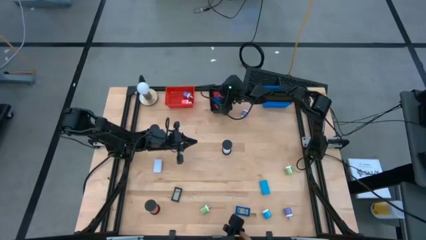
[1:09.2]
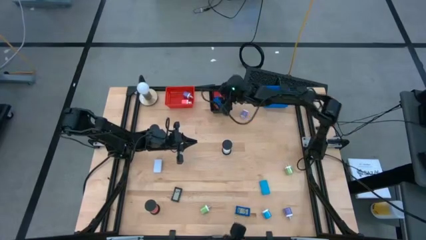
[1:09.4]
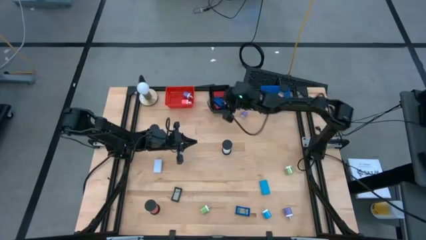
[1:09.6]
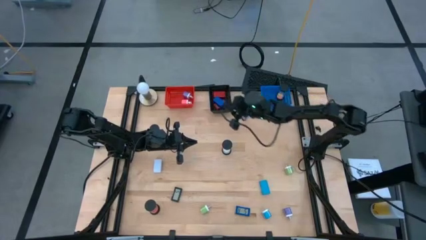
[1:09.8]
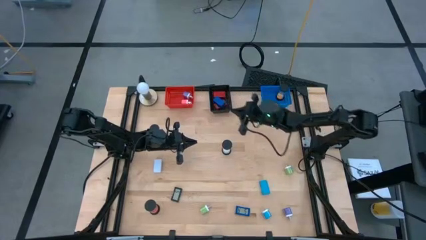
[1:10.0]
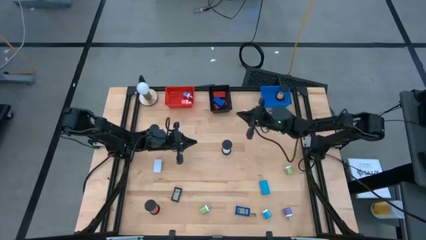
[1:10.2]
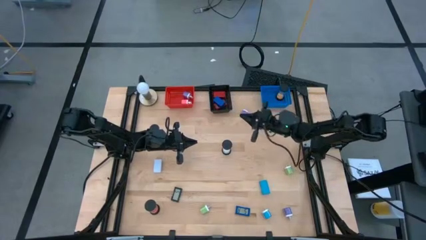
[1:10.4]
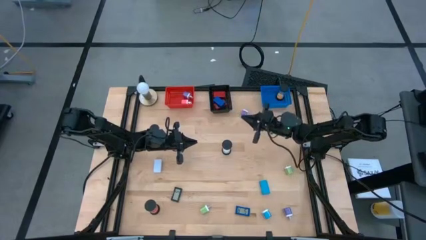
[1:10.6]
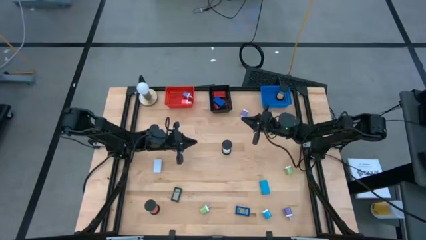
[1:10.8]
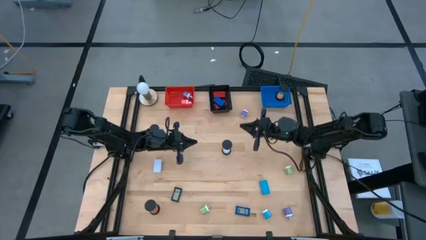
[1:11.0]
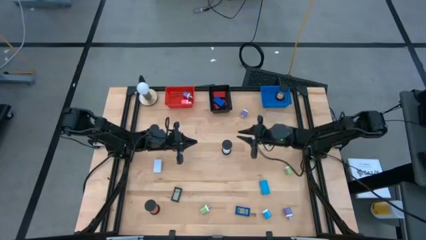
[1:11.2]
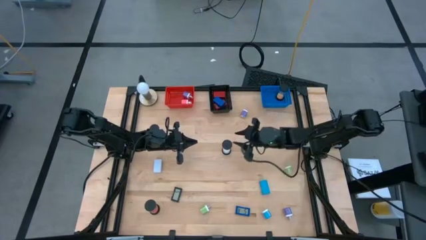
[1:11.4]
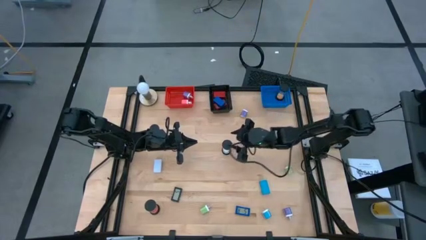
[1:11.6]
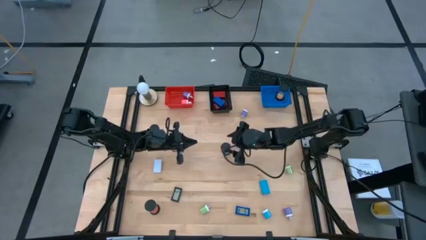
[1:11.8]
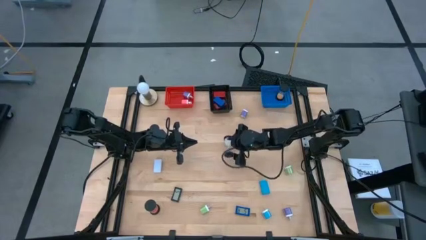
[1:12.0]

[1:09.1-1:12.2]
Task: Pick & Place Office items
Put the white hourglass into the blue bin

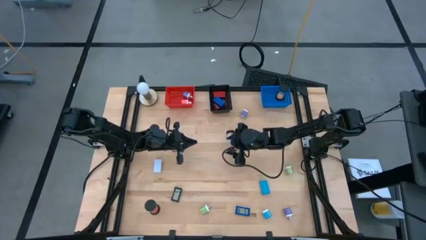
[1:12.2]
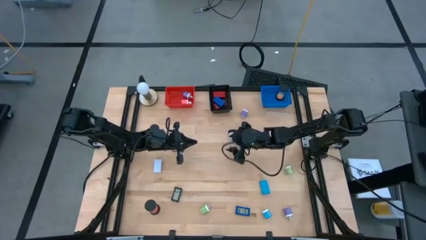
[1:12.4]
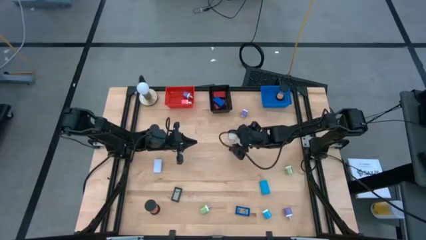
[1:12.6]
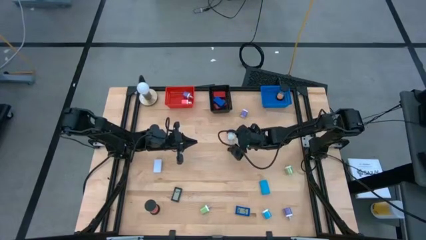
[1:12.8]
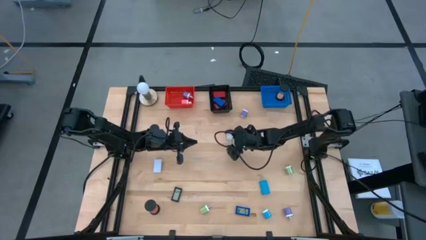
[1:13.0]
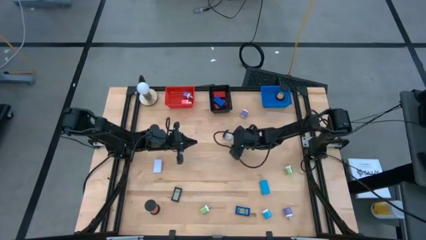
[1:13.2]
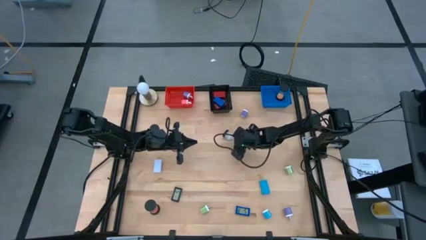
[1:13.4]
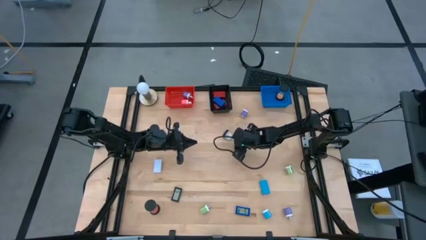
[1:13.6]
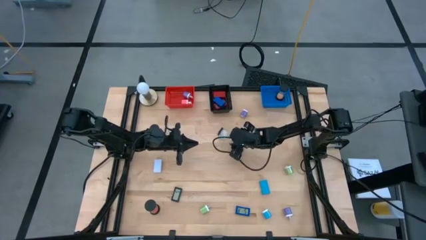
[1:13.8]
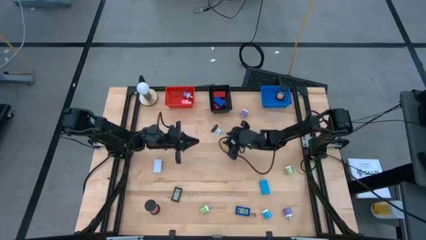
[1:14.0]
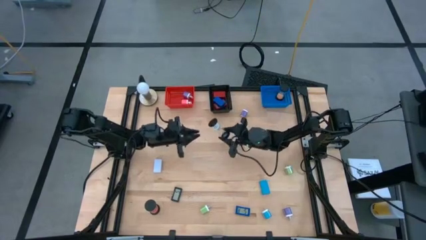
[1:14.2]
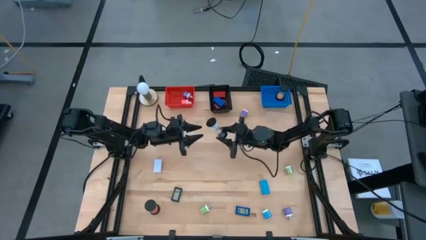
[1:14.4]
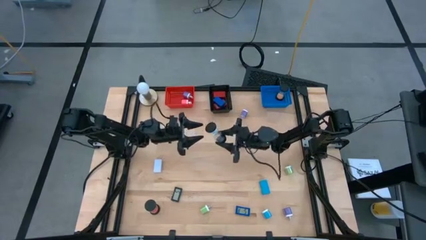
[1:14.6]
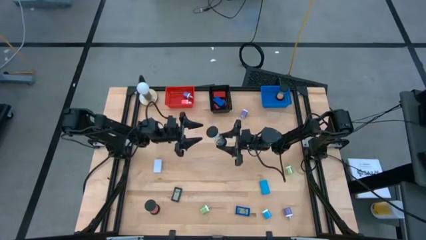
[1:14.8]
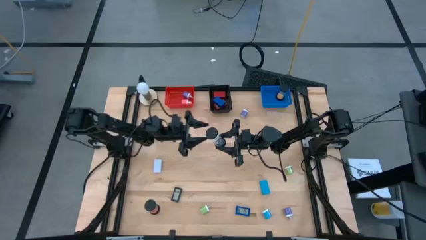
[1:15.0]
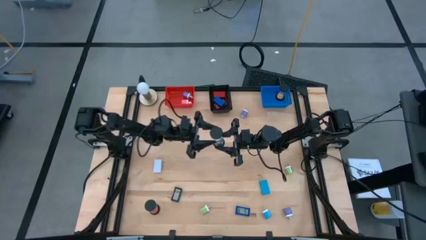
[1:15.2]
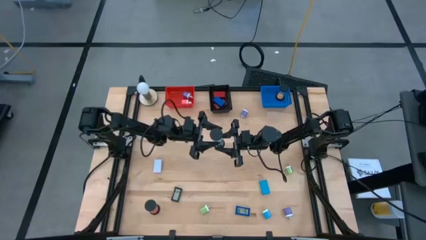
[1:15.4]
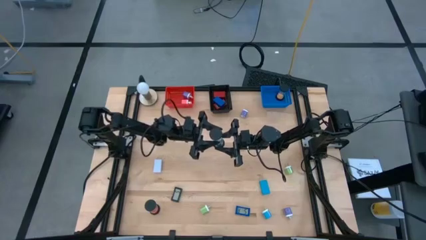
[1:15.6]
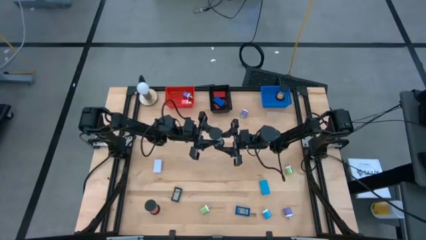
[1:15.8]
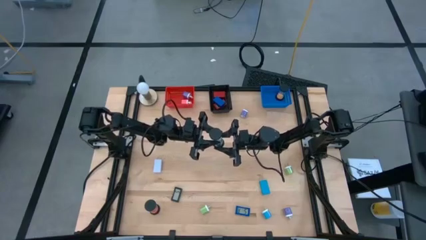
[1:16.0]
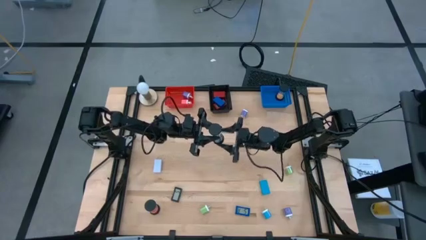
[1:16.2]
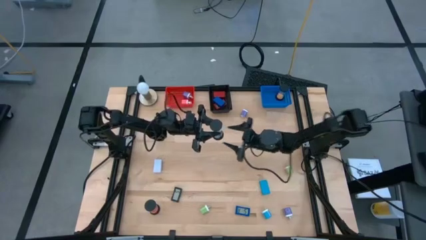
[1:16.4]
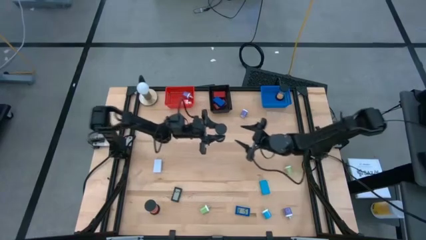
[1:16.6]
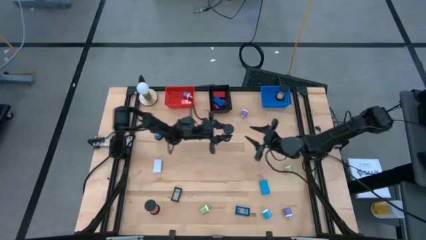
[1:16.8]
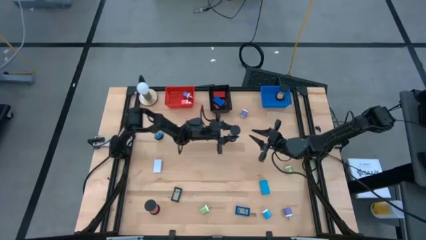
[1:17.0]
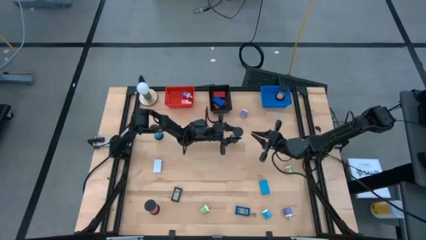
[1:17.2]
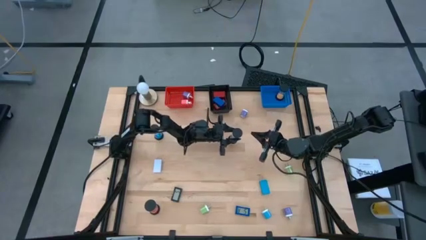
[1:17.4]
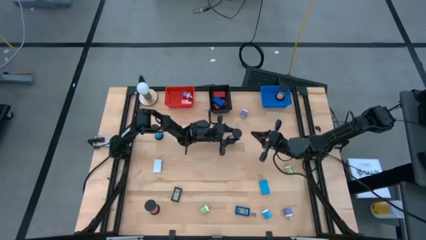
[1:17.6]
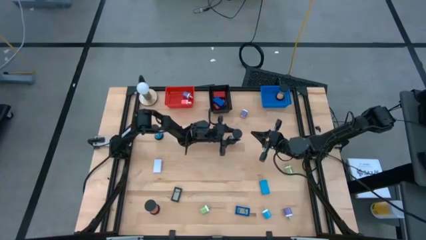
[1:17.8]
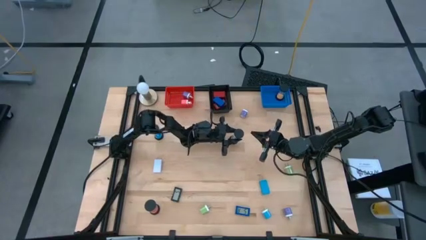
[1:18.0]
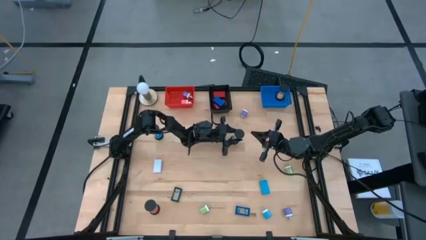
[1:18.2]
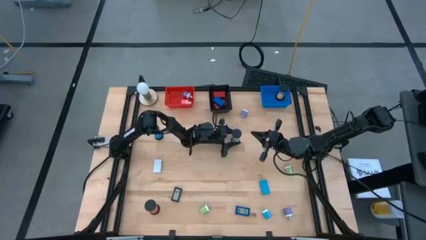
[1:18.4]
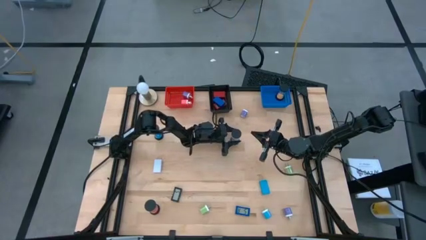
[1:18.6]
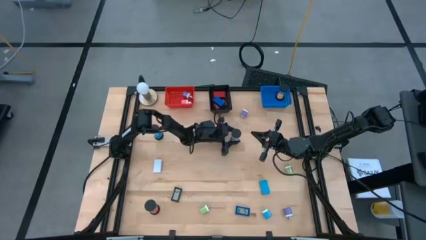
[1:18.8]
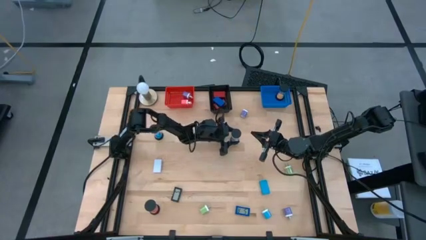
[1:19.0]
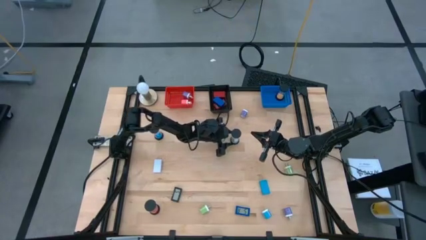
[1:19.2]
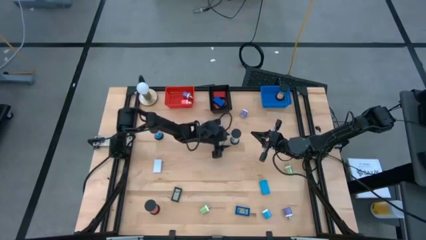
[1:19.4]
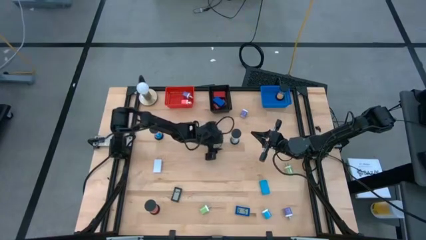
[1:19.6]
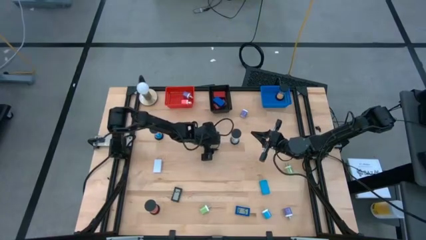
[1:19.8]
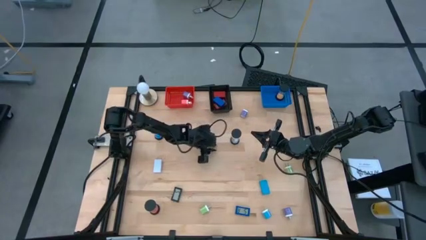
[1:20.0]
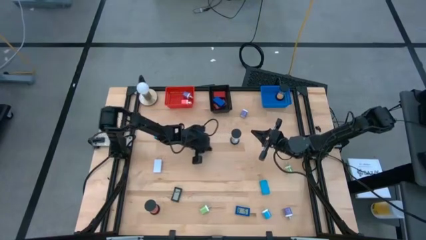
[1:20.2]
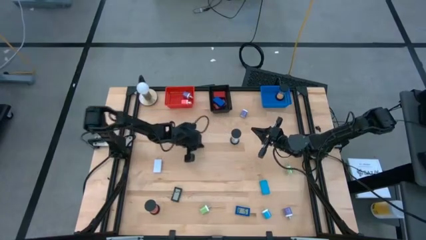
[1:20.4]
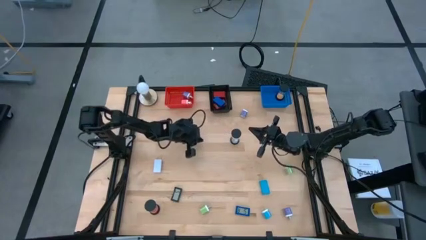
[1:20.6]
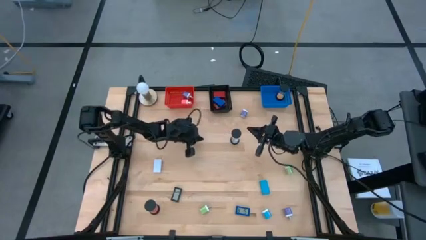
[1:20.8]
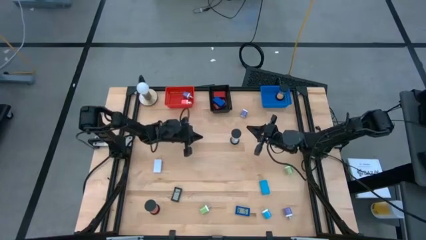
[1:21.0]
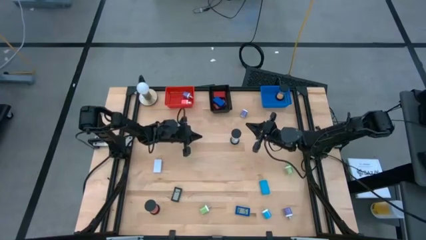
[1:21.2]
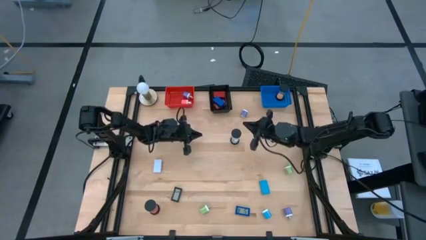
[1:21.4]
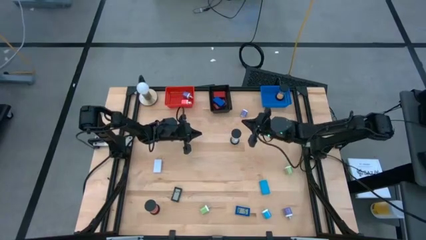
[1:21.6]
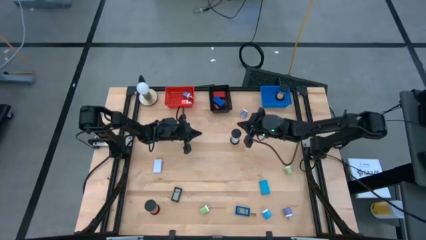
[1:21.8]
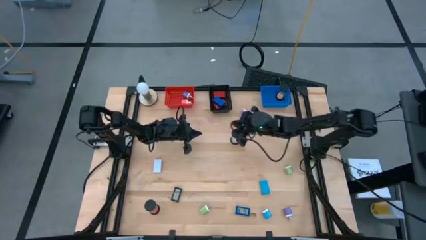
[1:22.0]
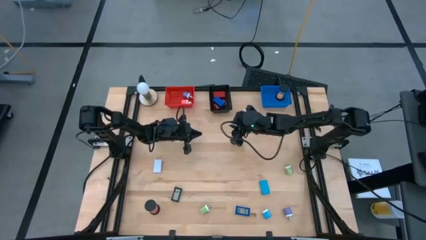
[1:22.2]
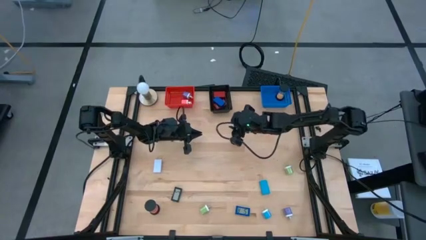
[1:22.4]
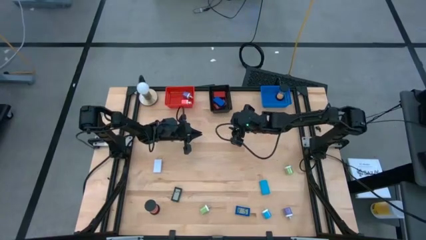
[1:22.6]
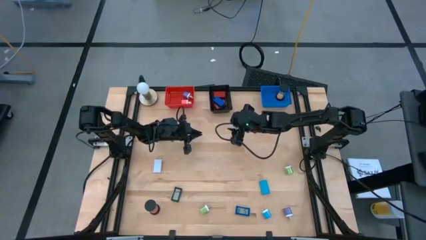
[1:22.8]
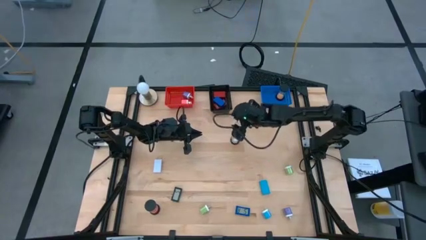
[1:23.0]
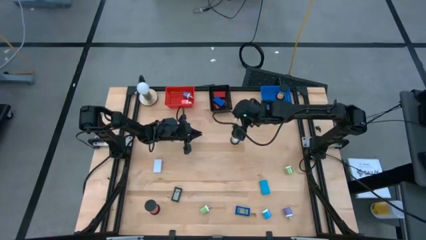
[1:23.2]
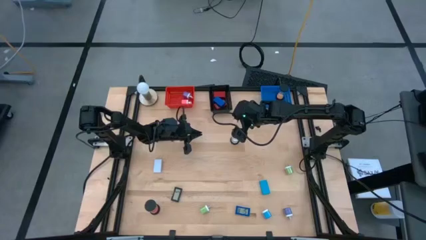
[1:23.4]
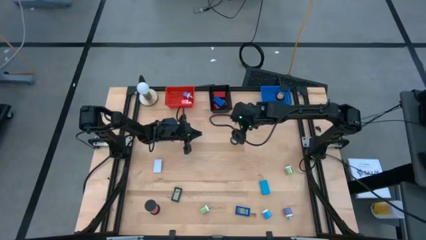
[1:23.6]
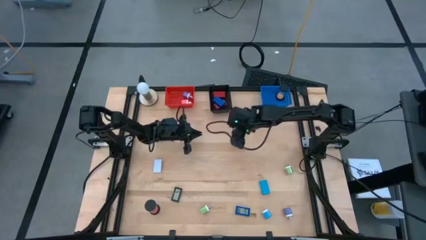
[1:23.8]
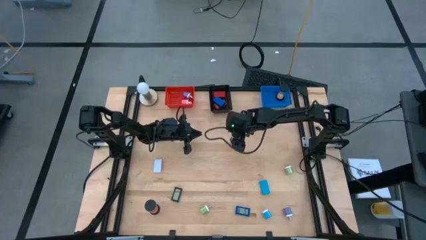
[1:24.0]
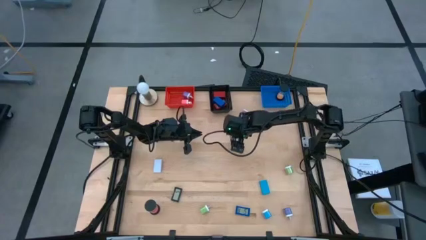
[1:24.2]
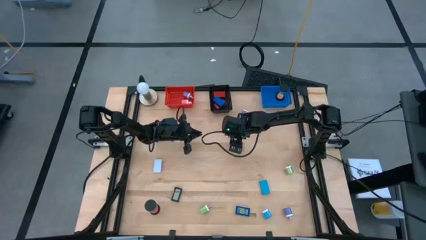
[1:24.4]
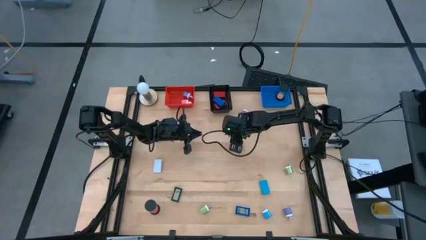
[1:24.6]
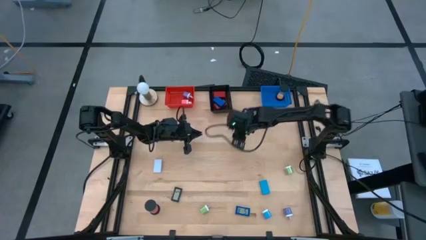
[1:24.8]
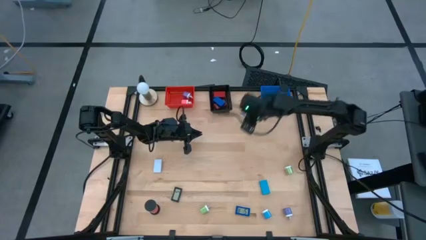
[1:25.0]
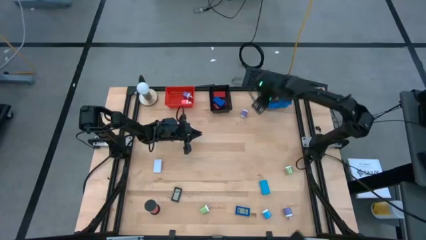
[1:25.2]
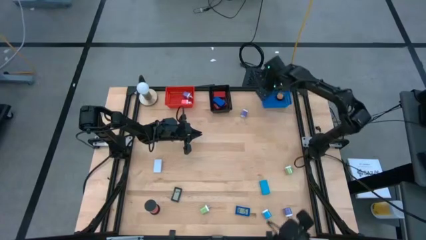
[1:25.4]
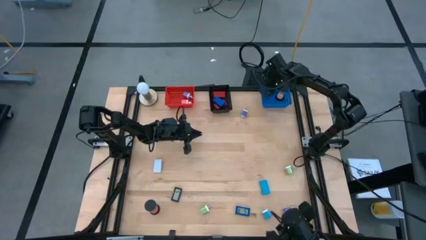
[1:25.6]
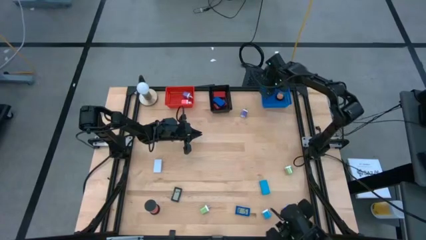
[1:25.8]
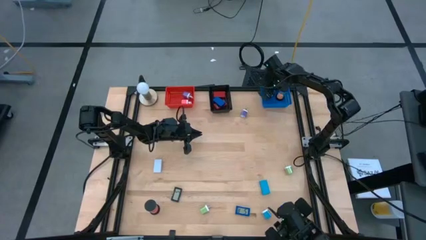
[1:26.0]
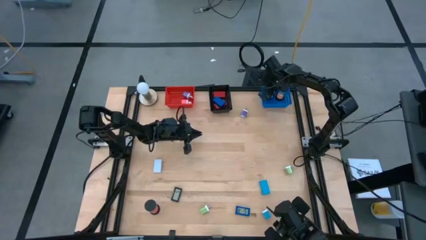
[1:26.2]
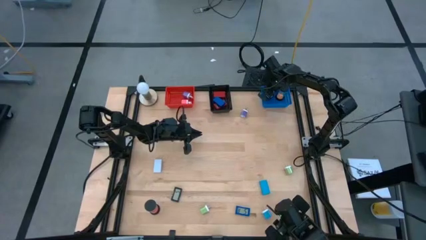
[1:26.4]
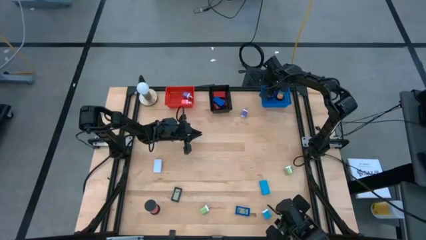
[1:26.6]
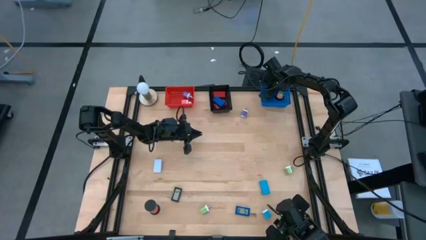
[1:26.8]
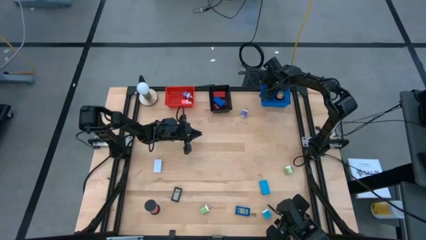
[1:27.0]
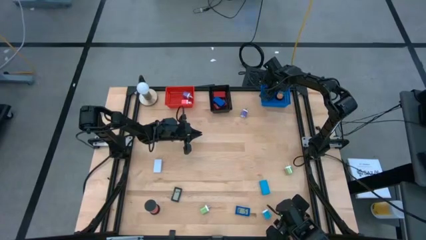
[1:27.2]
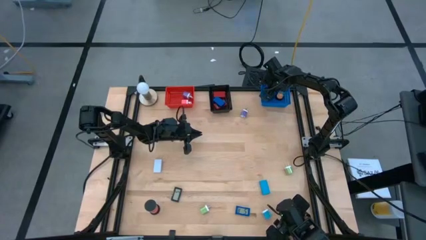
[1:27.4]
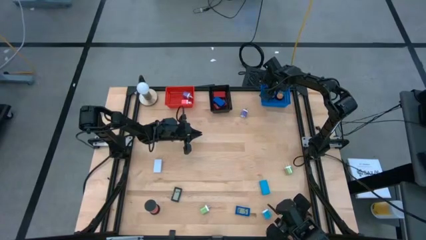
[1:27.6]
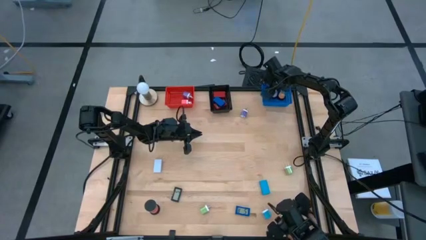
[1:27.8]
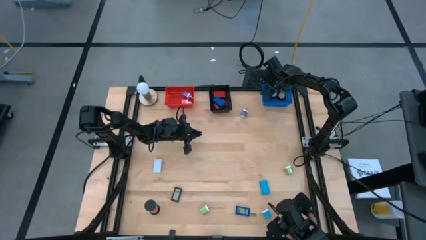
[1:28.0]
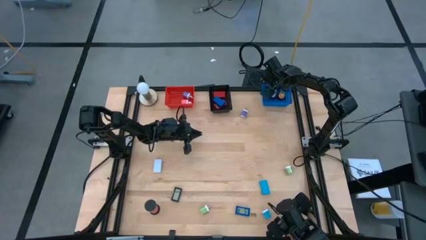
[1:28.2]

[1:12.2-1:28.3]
Put the white hourglass into the blue bin
